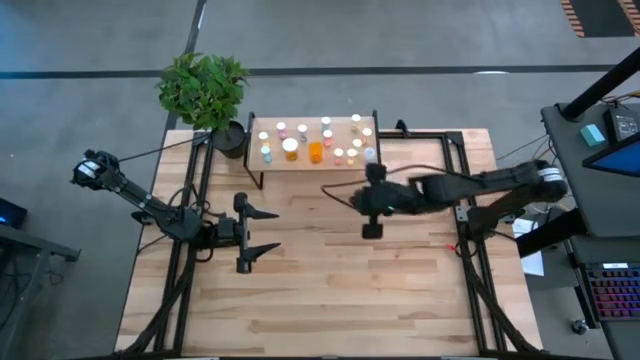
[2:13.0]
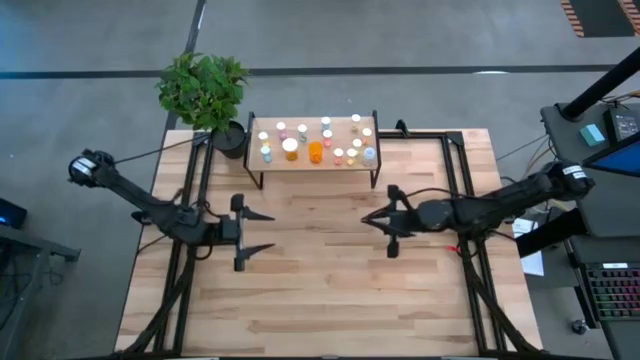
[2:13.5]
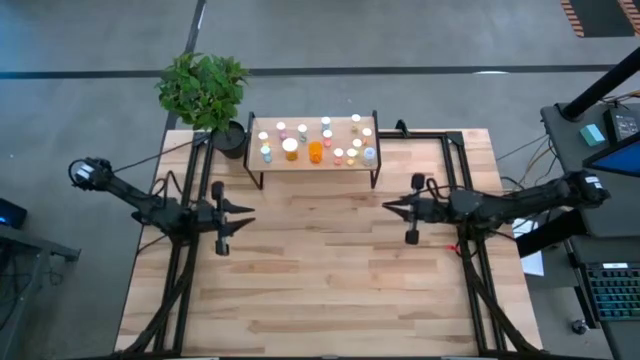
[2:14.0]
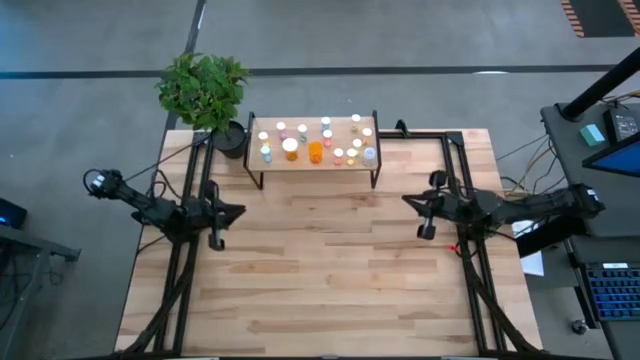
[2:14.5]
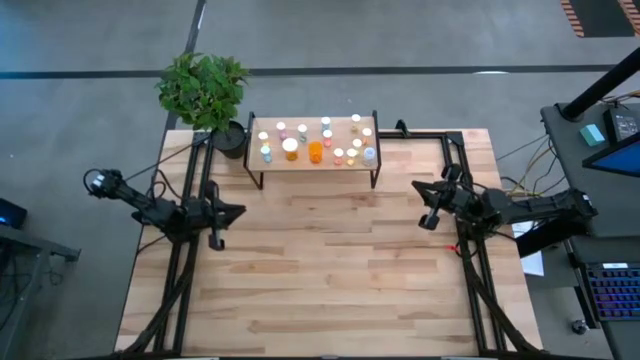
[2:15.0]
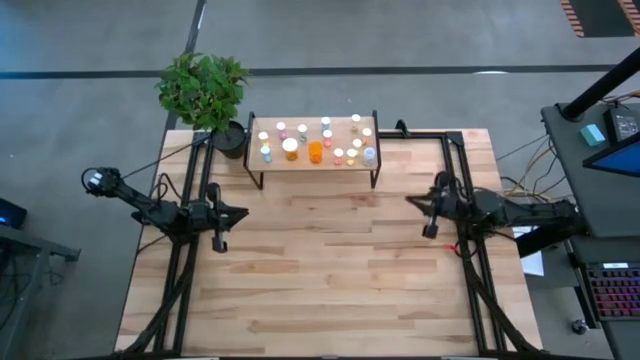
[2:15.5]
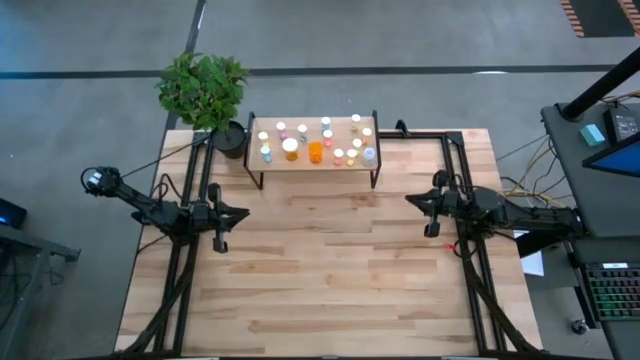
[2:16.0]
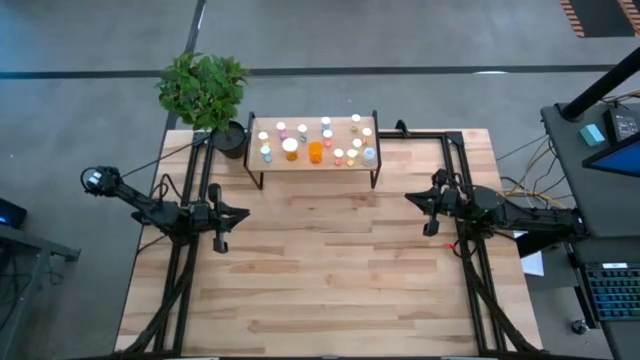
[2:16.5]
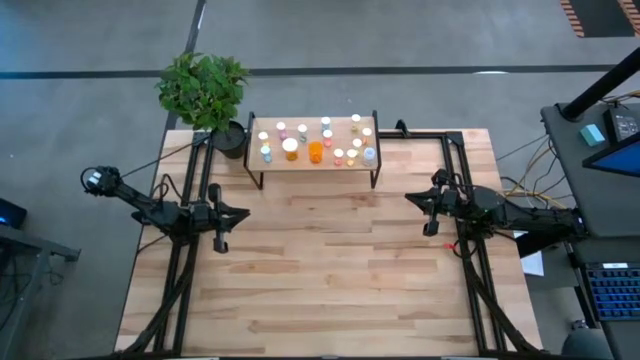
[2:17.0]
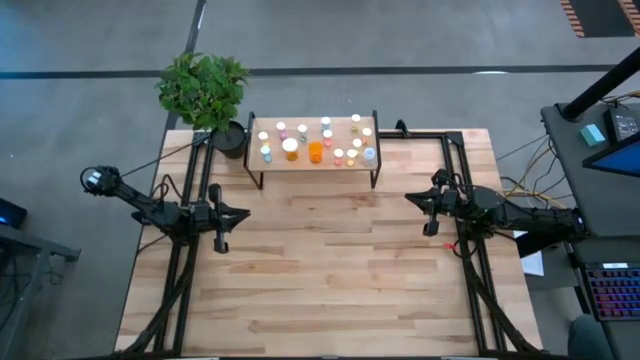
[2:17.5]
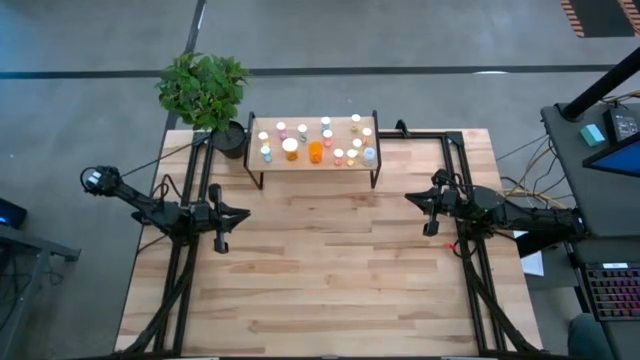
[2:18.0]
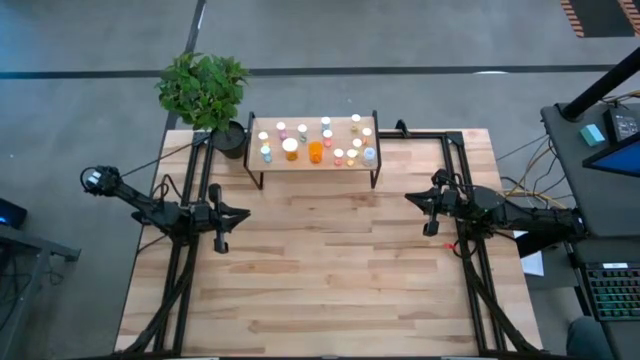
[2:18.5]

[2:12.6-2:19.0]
Task: Pick and place medicine bottles onto shelf by color
Return to Home Position

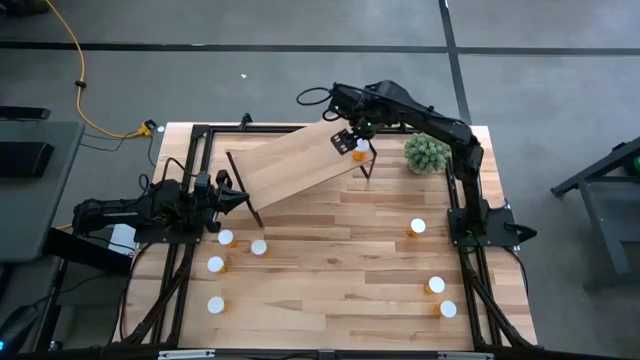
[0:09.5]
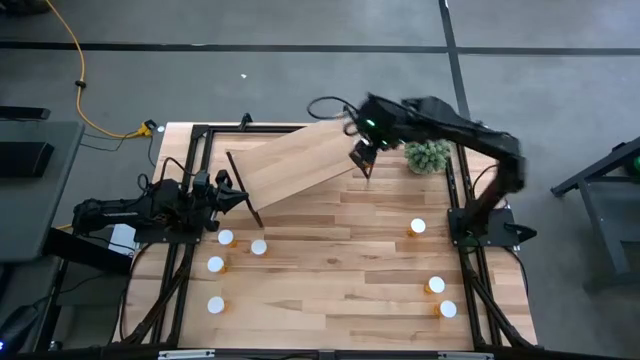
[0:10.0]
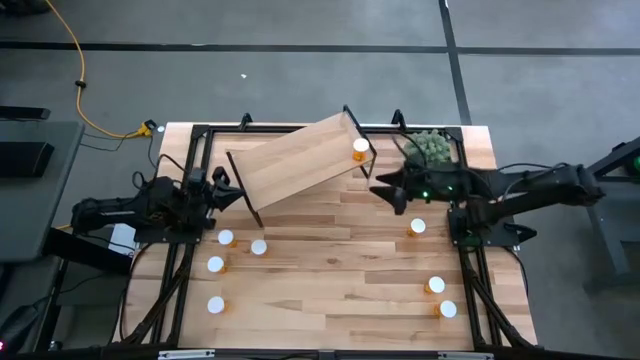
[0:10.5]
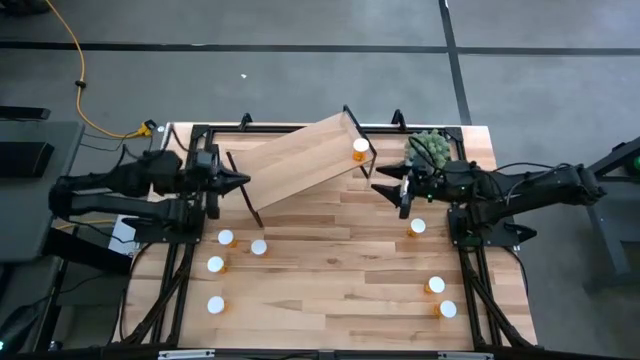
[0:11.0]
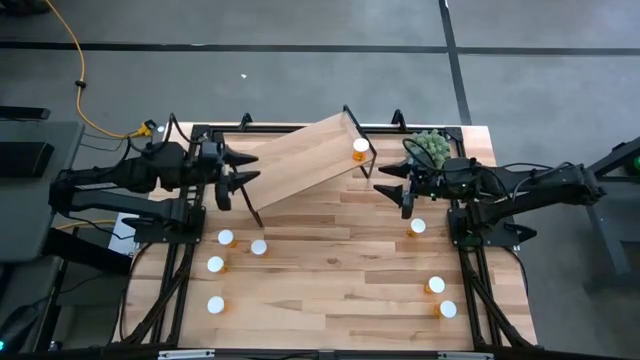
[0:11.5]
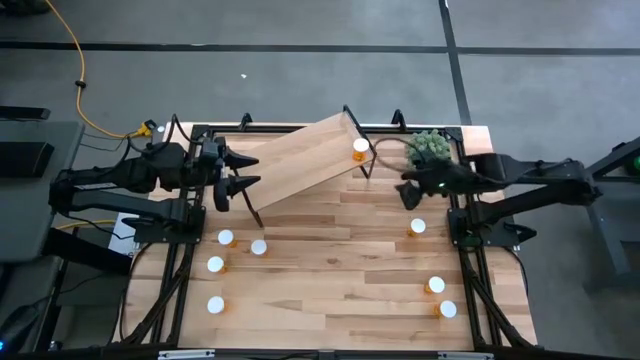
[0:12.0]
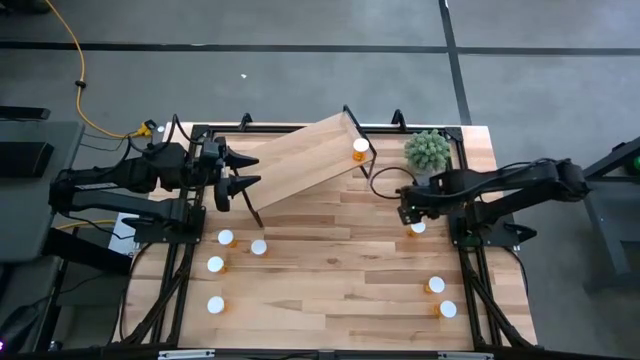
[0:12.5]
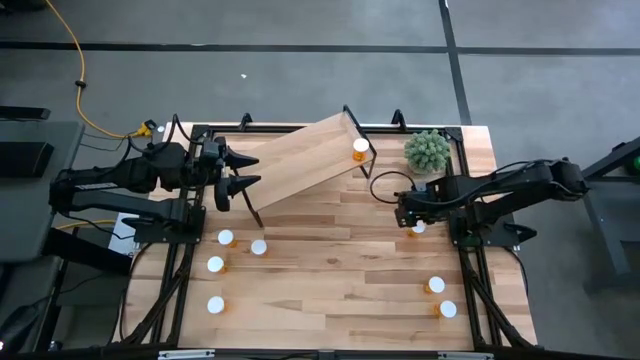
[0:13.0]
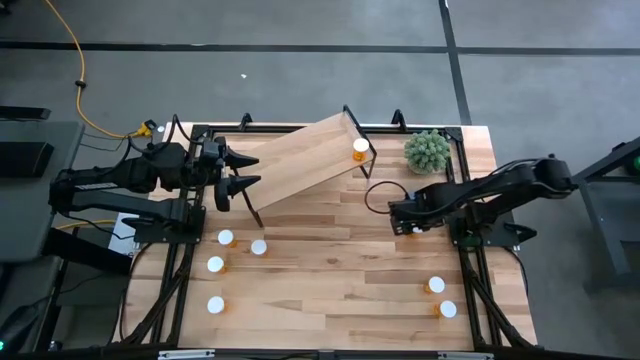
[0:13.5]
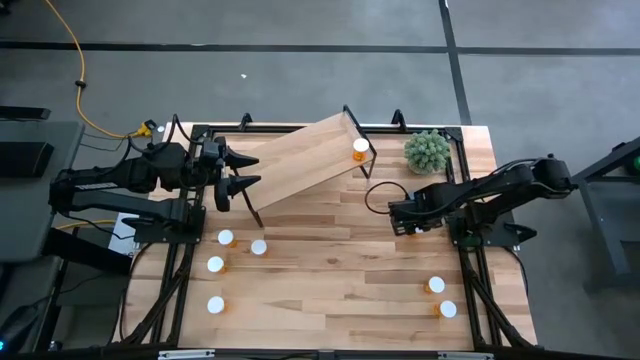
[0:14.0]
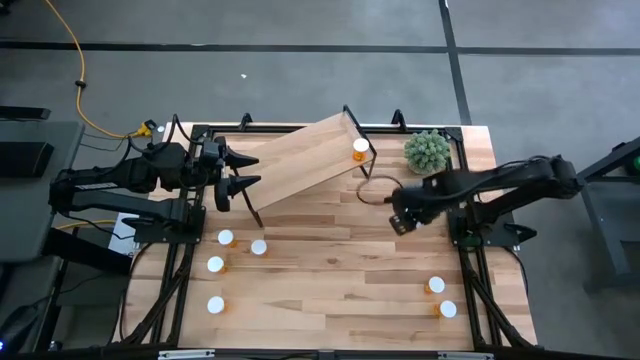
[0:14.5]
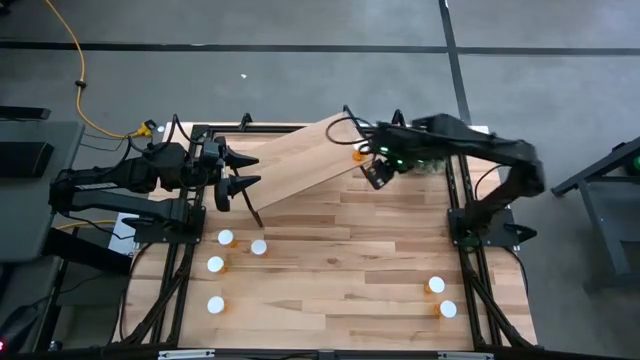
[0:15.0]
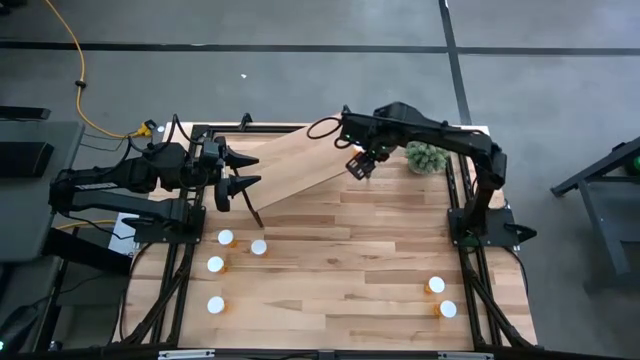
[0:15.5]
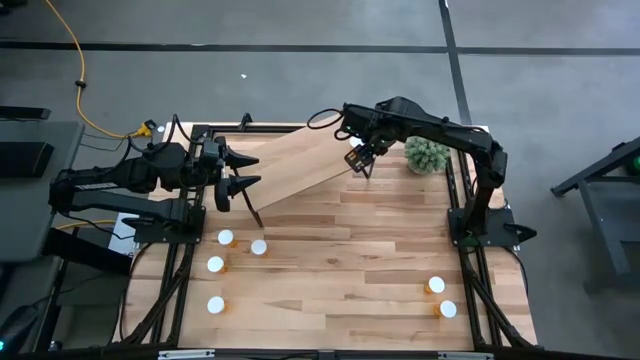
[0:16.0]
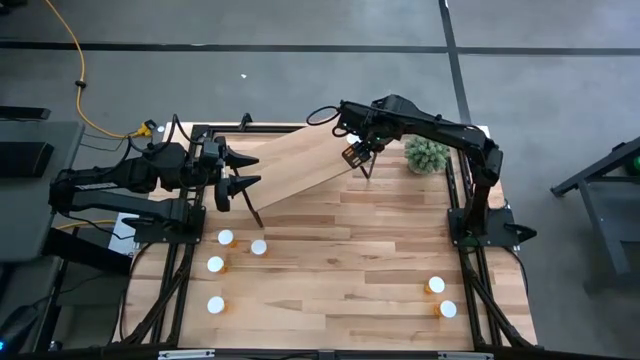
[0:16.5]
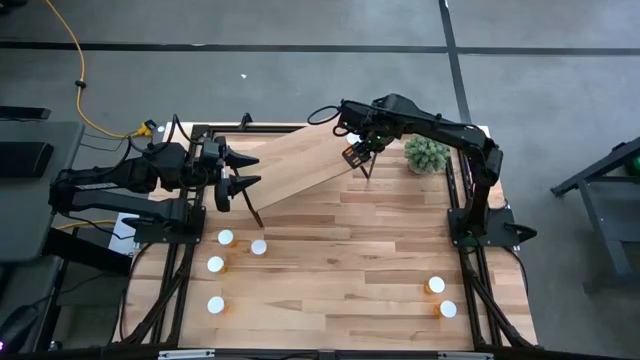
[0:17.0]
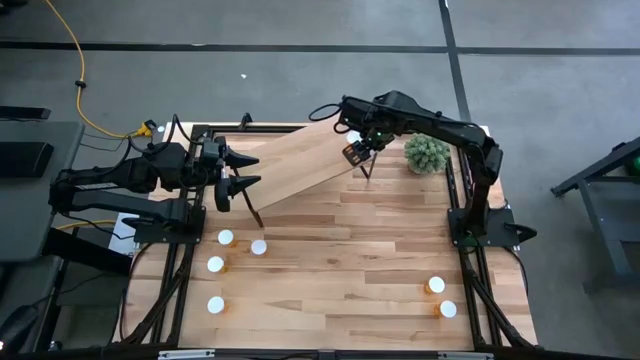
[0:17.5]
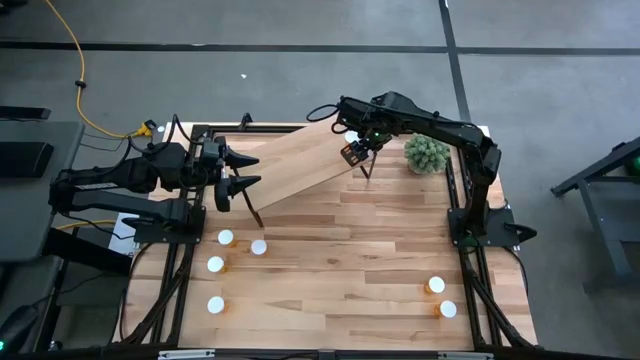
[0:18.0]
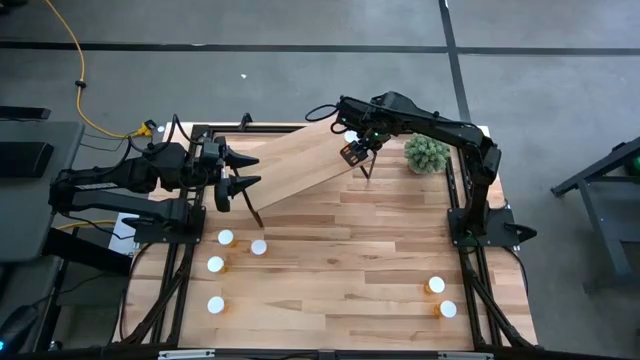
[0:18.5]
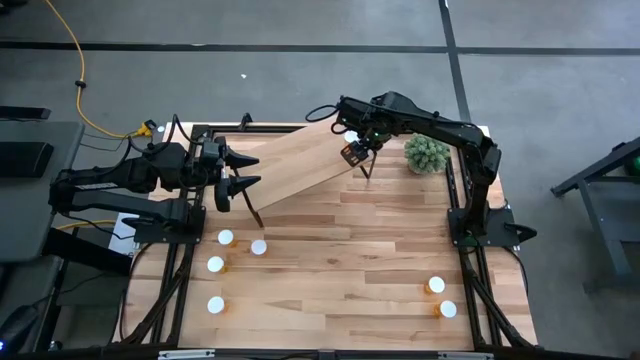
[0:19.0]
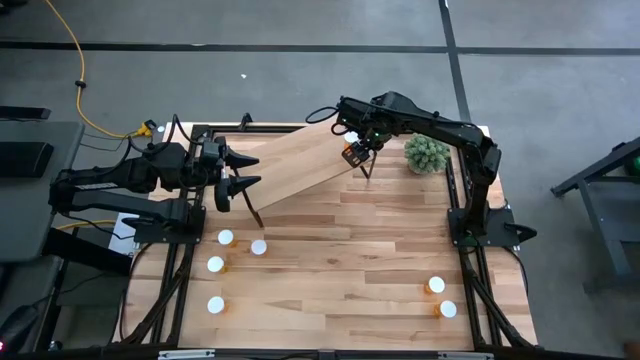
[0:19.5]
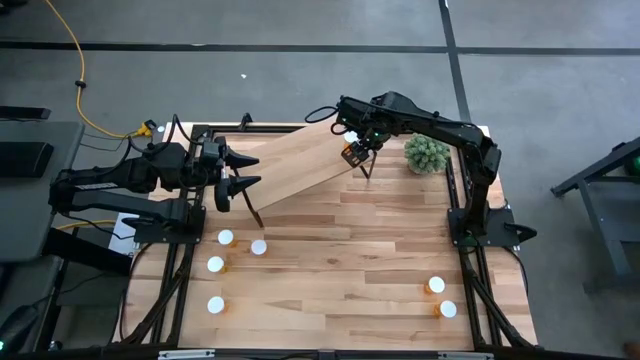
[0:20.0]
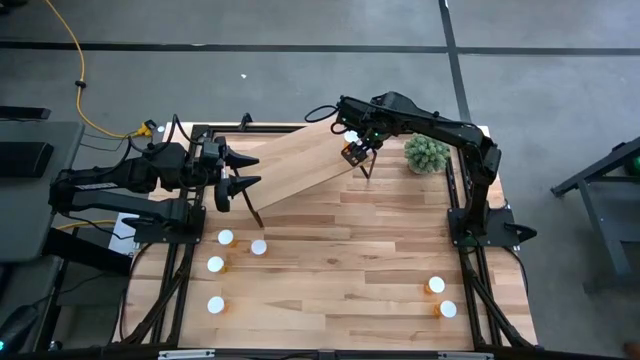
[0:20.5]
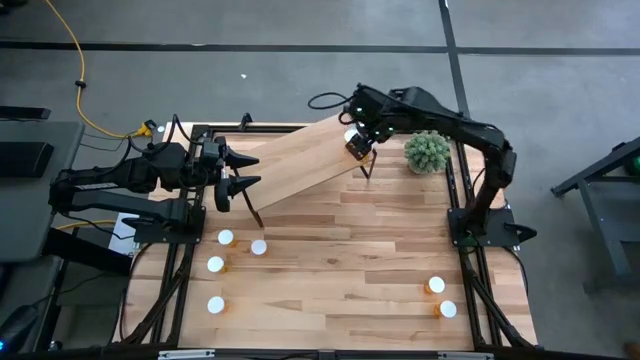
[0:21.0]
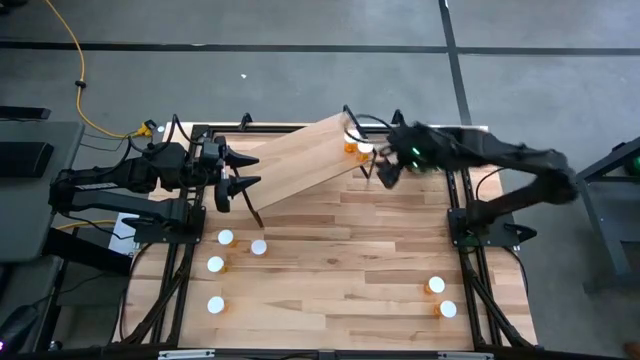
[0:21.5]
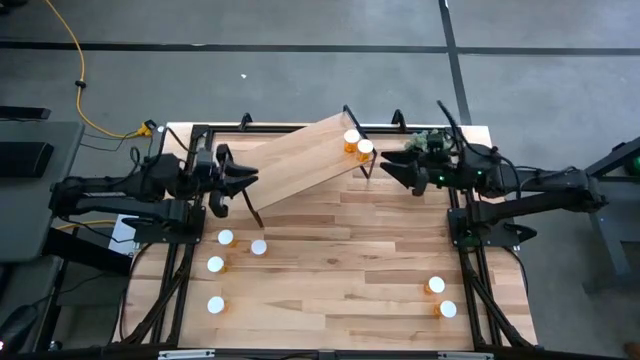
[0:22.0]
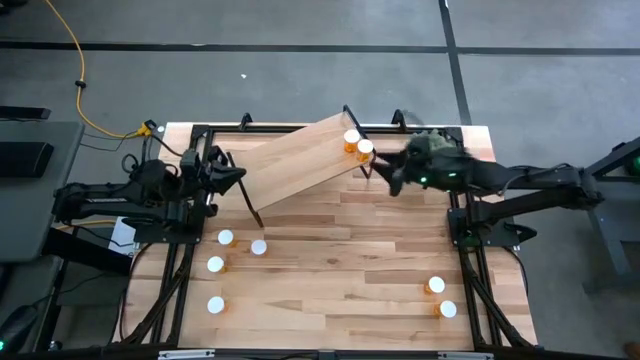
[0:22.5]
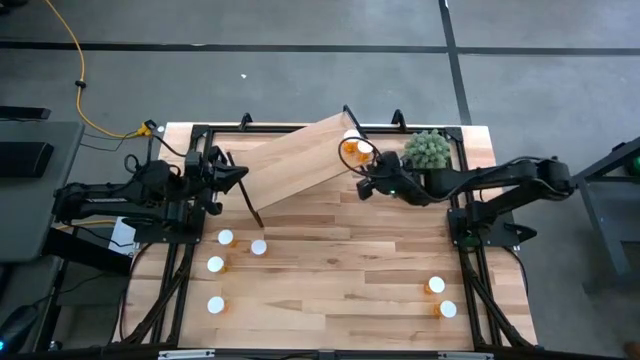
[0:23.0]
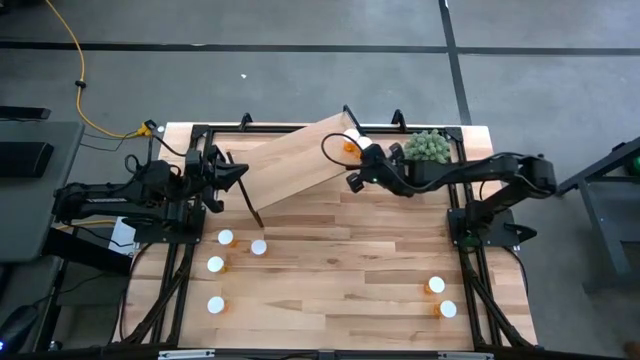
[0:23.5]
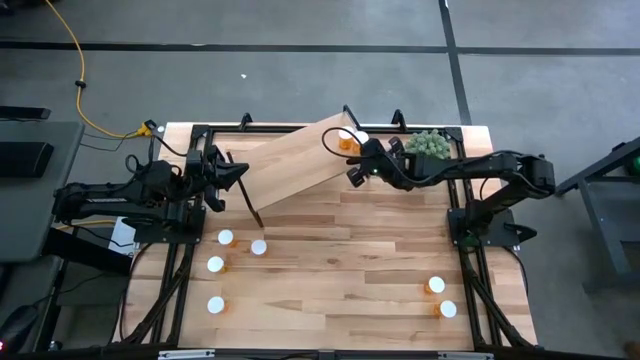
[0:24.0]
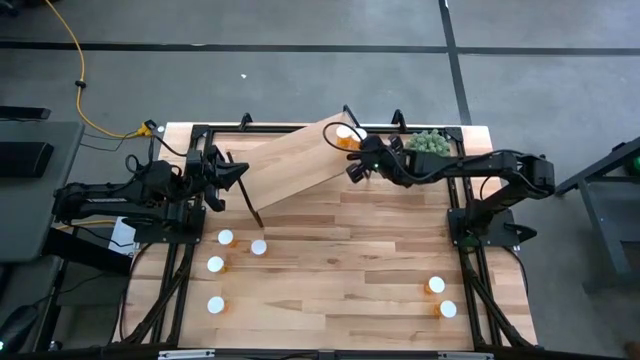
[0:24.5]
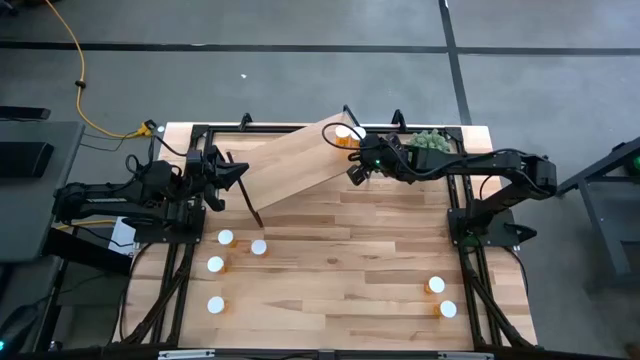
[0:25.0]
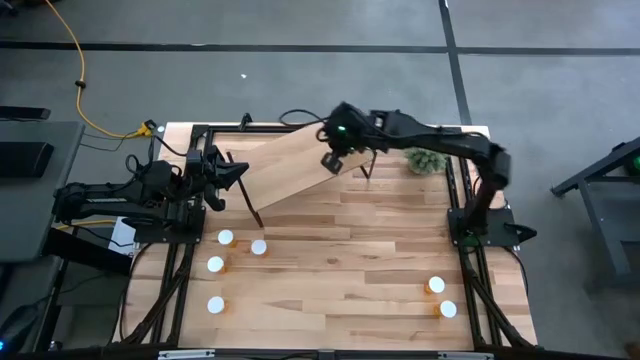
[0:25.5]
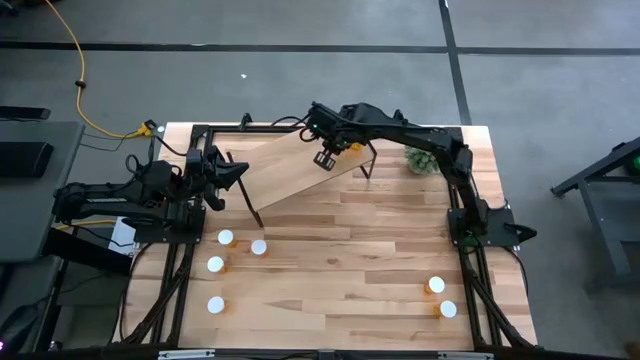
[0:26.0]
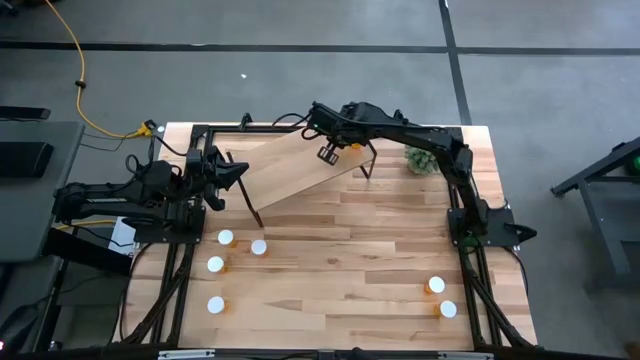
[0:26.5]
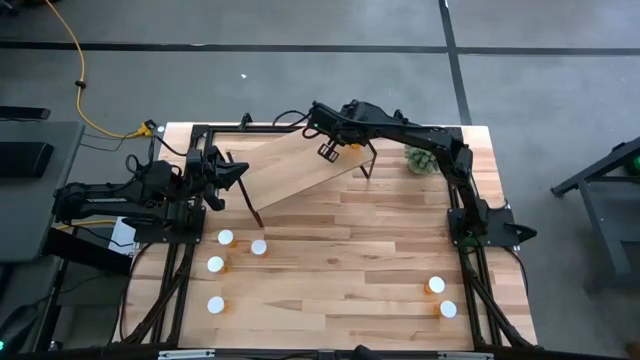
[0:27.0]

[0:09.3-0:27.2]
Task: Pick and place medicine bottles onto shelf by color
Put the pill bottle on the shelf aligned with the pill bottle
